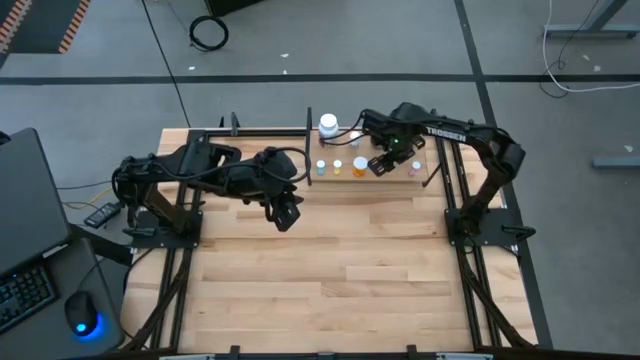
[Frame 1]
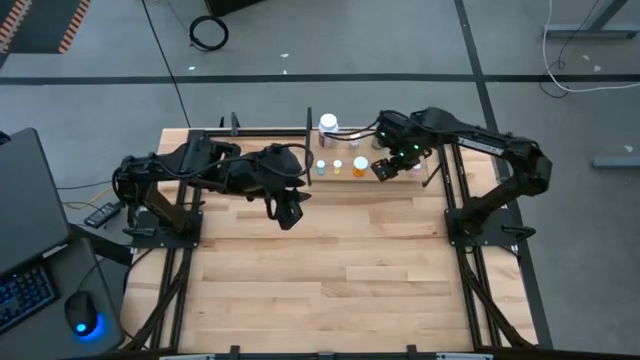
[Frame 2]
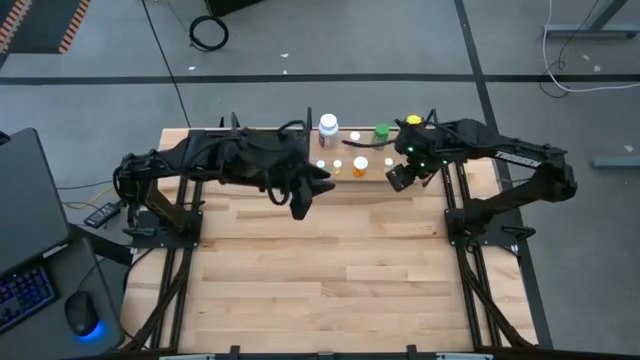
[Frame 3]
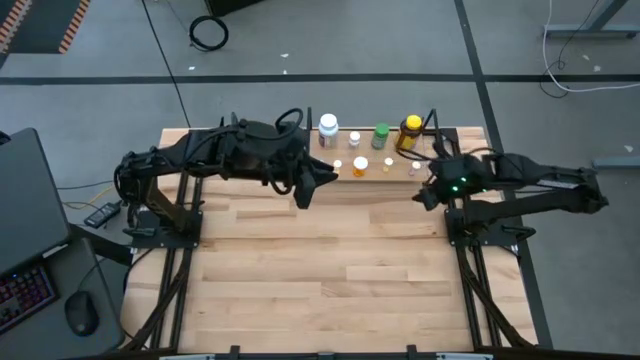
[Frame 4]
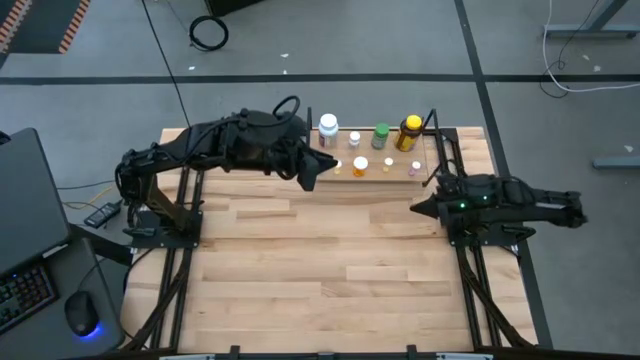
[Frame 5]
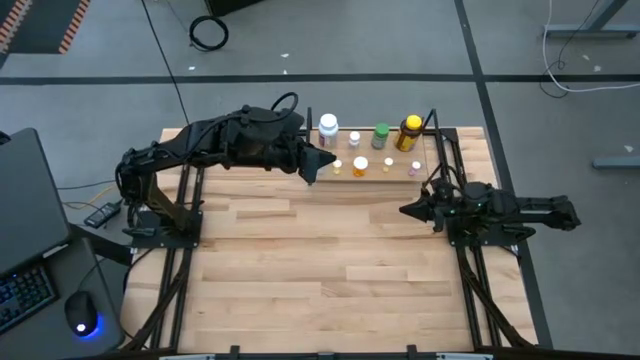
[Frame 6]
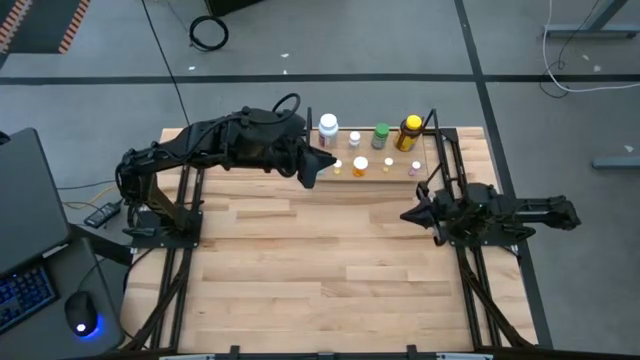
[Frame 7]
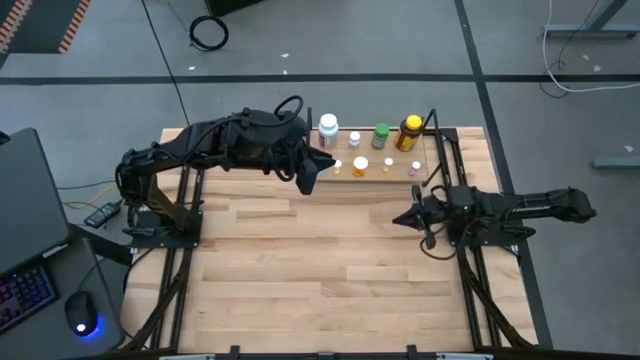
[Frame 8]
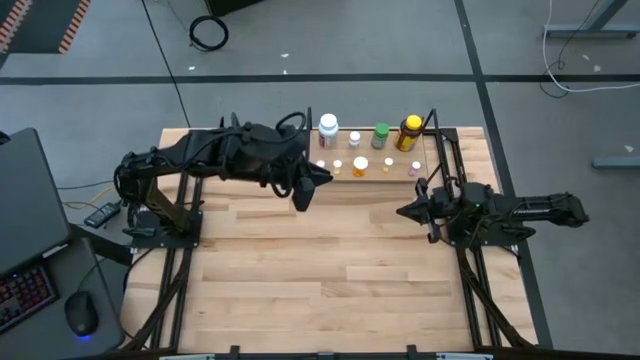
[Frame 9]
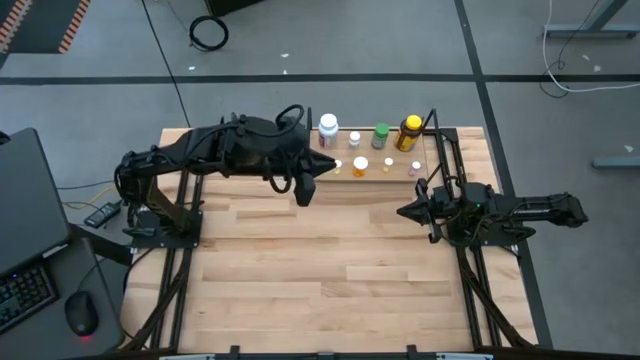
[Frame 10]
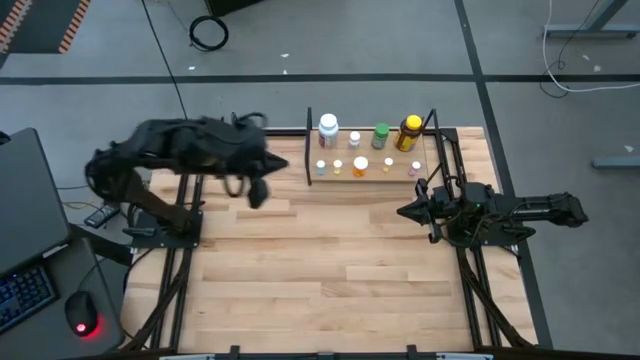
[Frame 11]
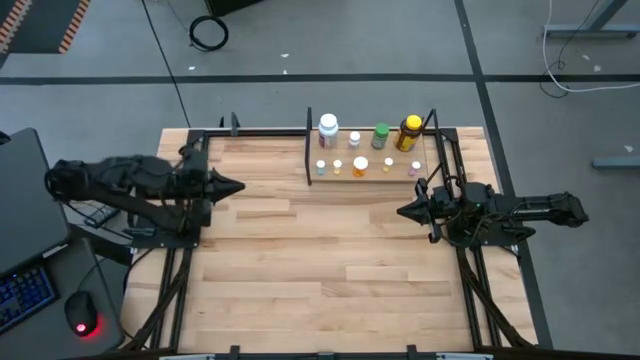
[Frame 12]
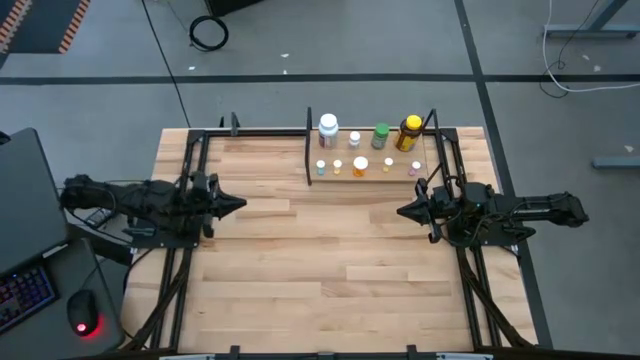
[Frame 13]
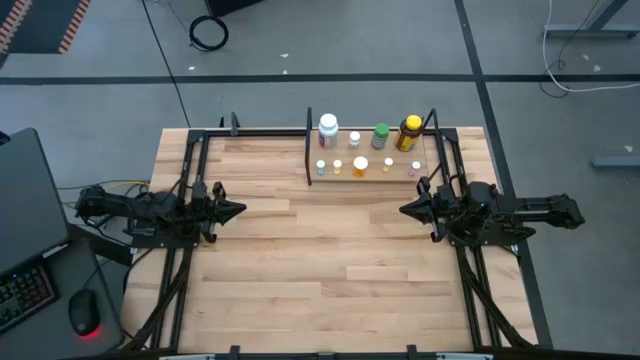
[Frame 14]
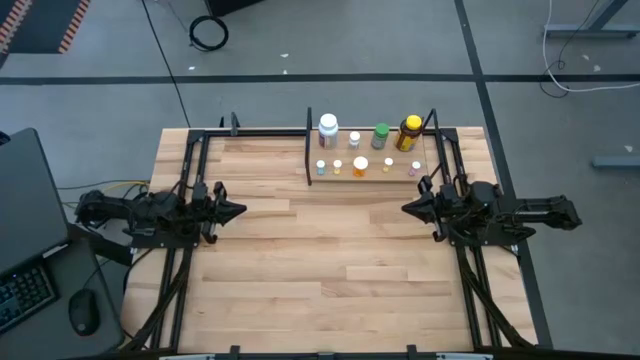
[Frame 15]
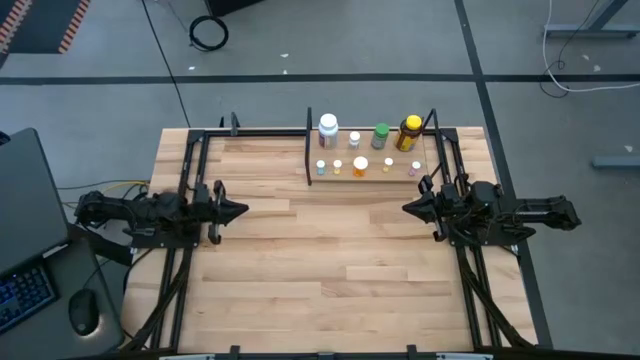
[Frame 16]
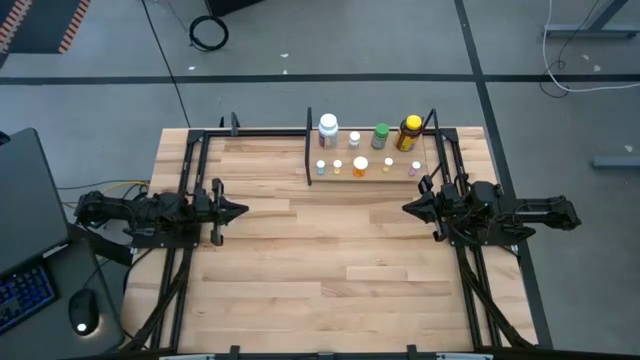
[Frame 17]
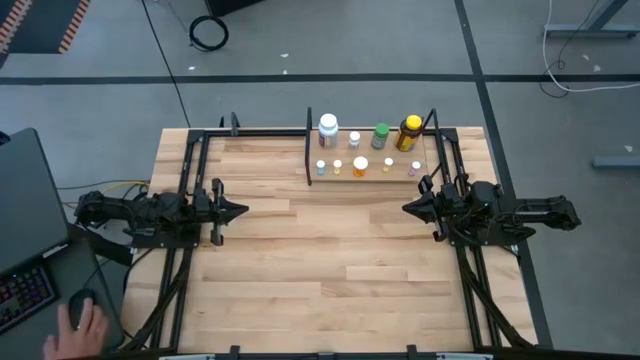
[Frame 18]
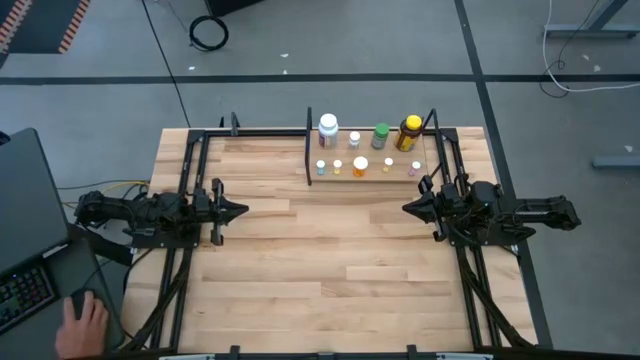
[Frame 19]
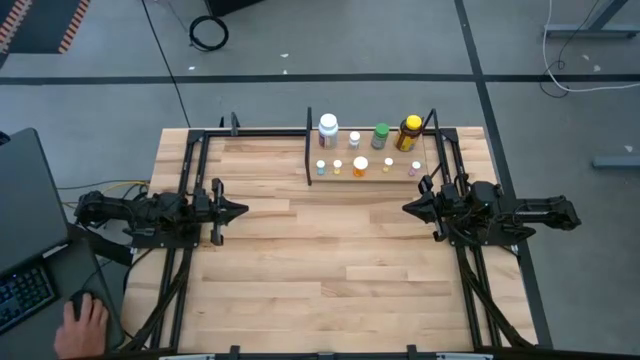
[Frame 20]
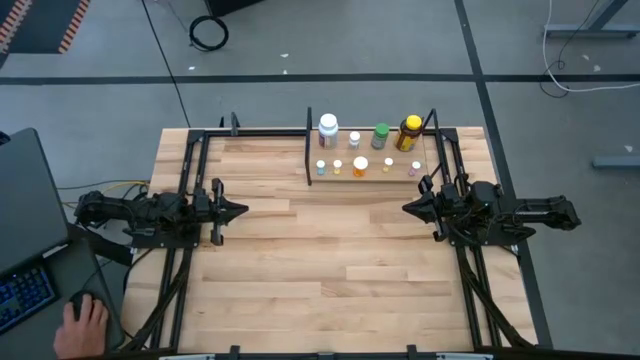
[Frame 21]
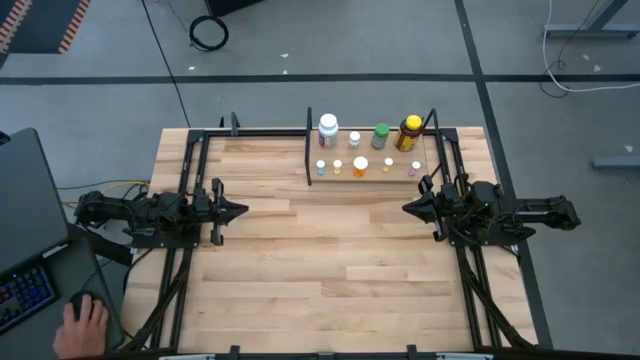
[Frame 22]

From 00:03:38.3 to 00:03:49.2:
Task: Pick and place medicine bottles onto shelf by color
Return to Home Position

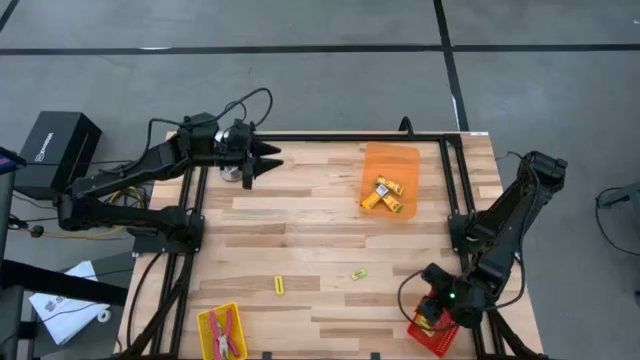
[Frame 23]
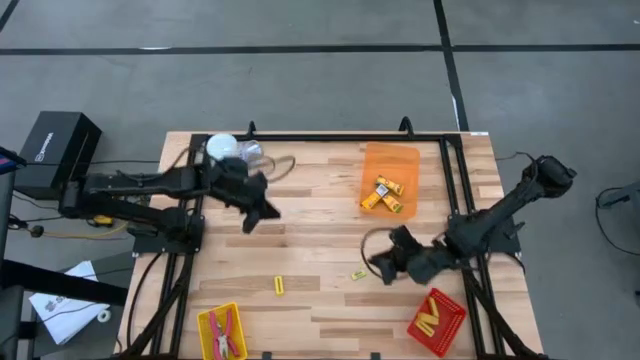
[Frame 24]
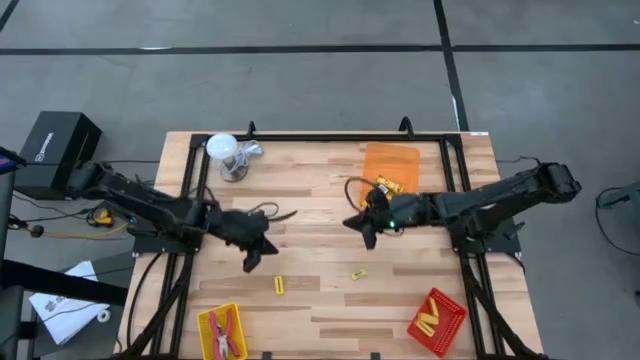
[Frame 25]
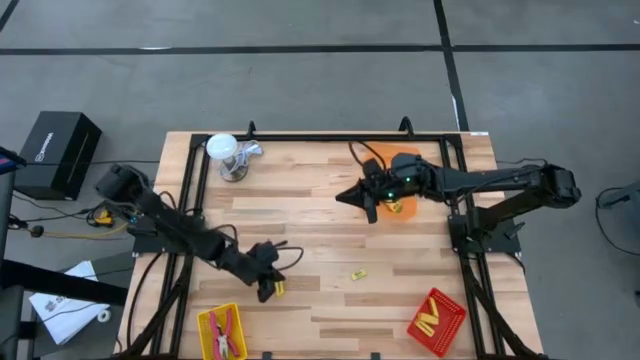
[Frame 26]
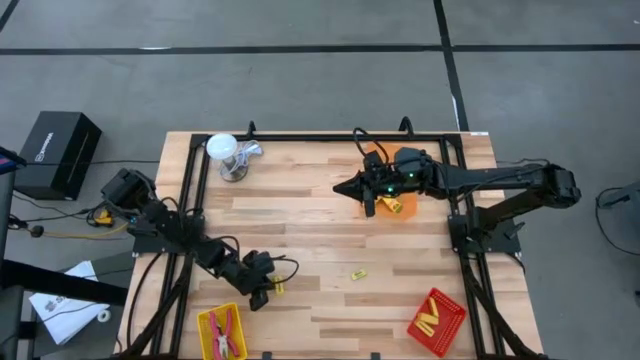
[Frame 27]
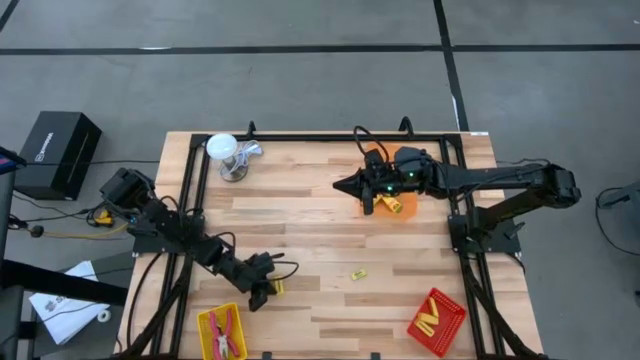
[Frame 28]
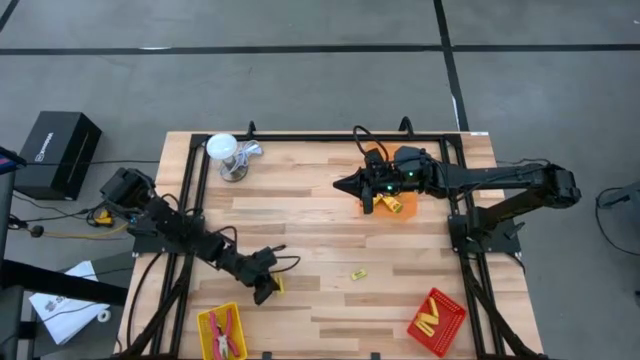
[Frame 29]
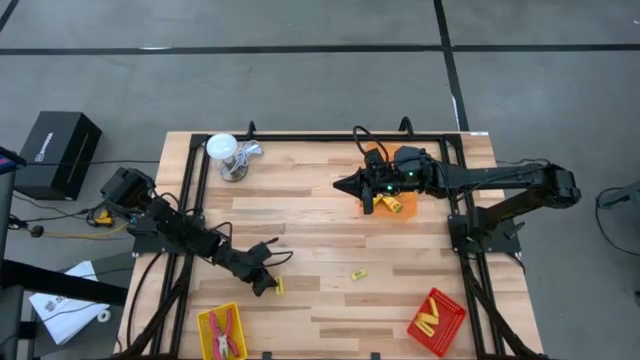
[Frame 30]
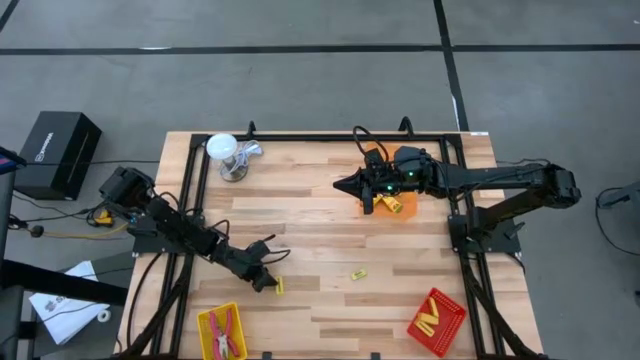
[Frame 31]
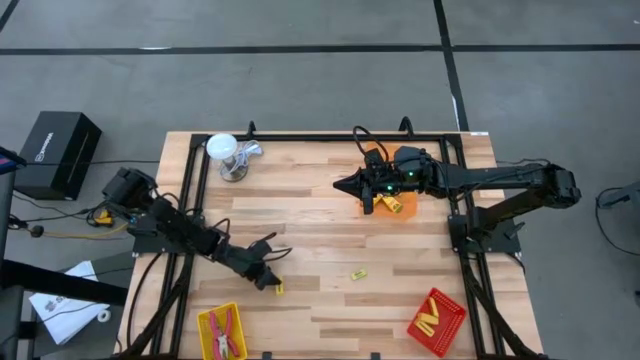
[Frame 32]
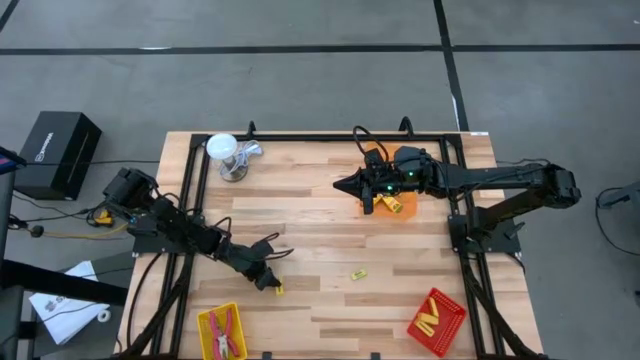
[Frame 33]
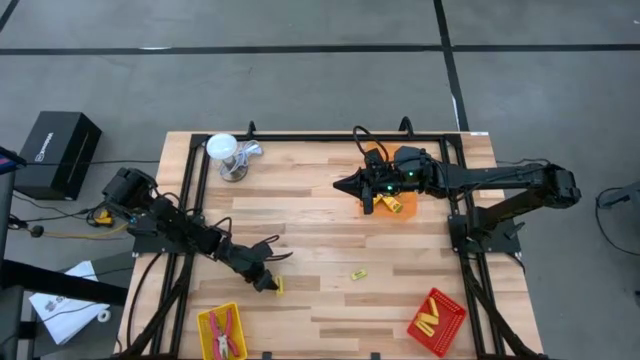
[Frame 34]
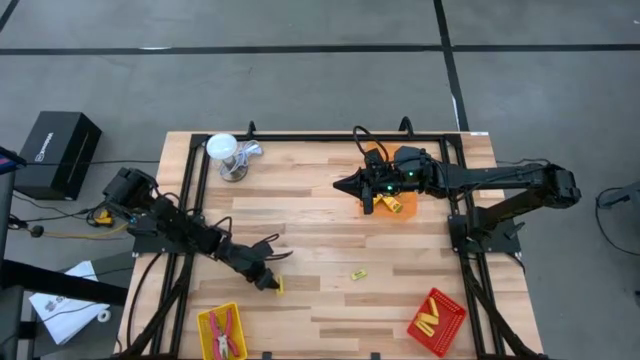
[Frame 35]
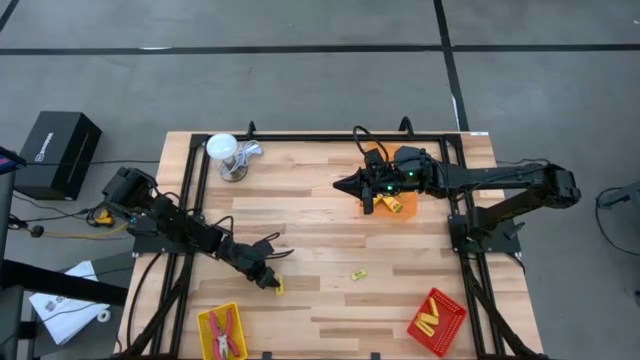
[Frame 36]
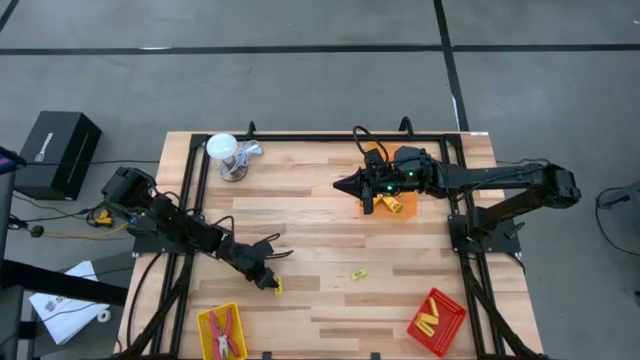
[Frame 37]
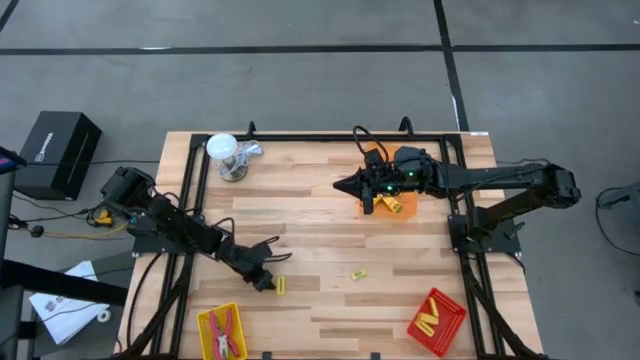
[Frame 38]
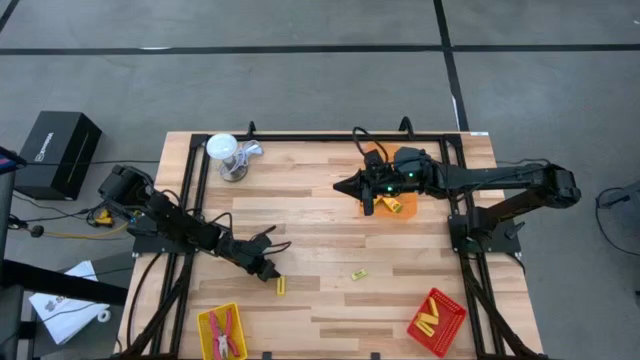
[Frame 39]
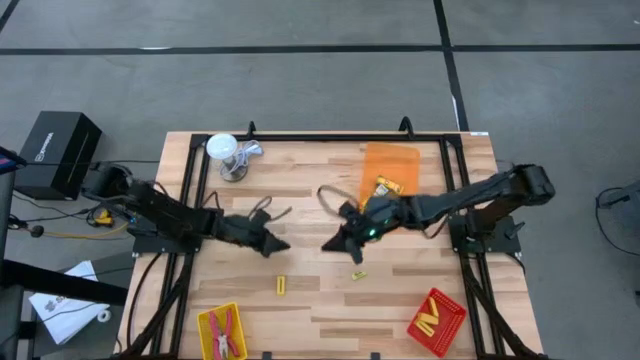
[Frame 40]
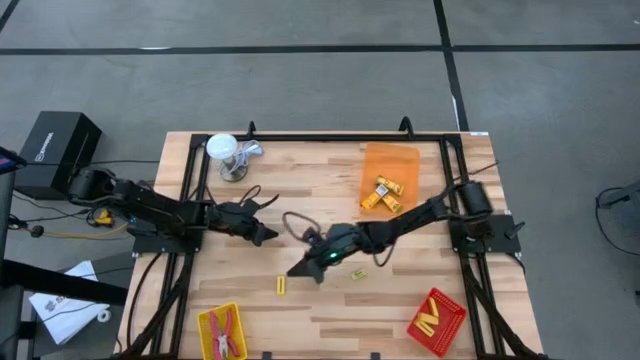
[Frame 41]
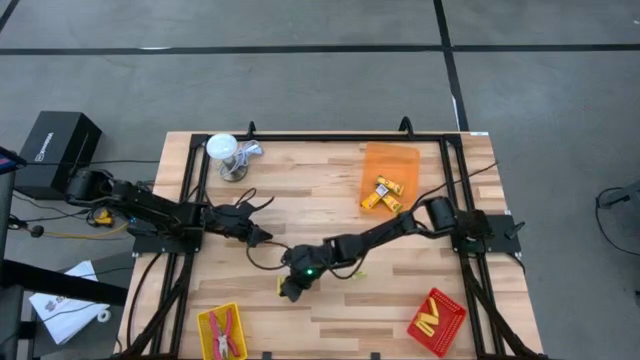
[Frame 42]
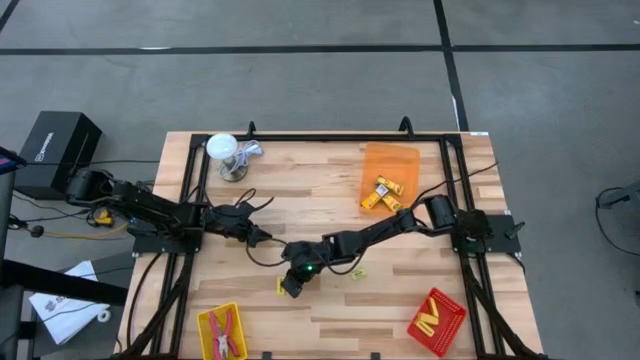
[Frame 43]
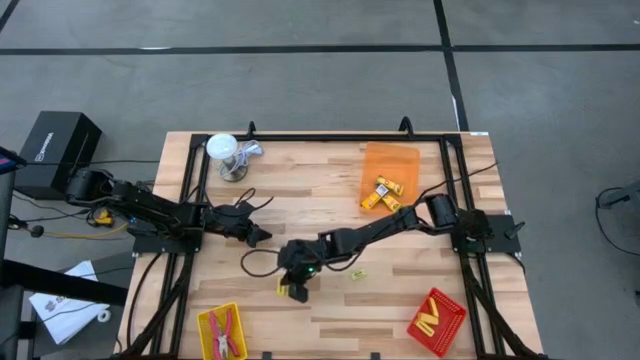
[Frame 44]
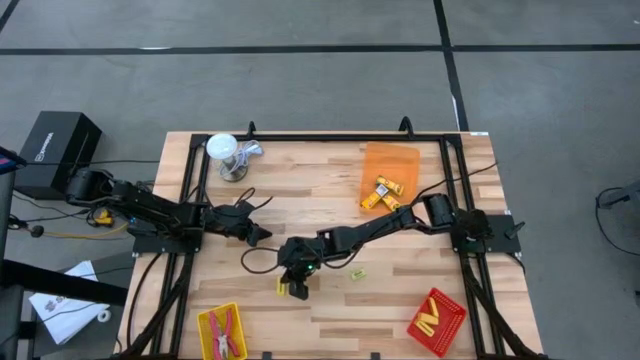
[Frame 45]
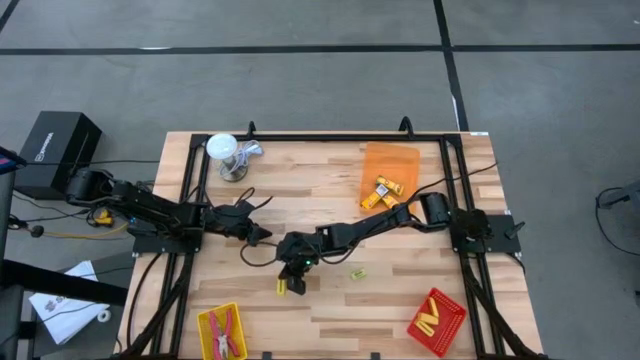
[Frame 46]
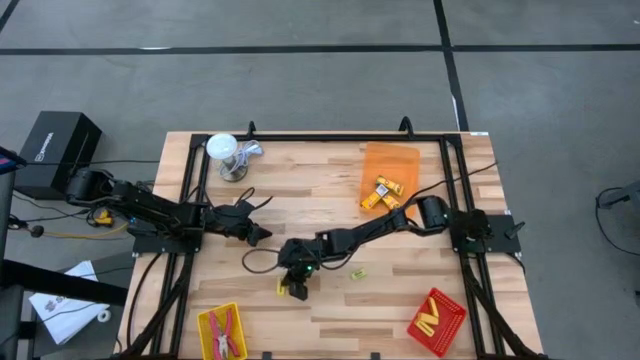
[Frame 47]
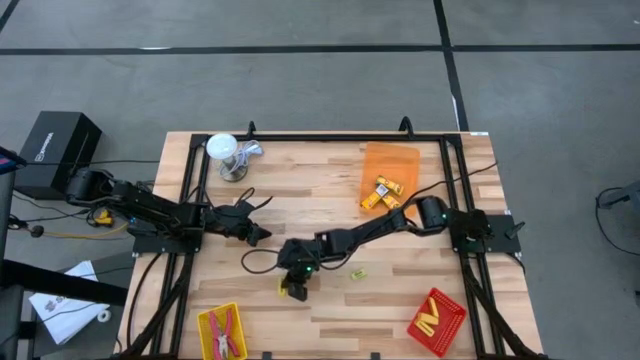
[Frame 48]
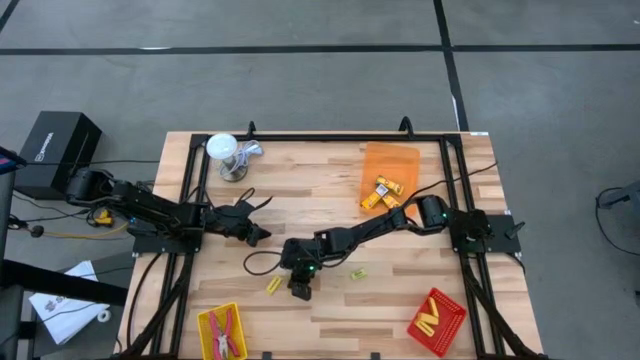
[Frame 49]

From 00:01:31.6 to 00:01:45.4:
Task: Pick & Place School Supplies
Put the yellow eraser into the red bin
